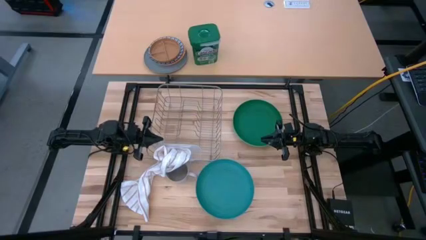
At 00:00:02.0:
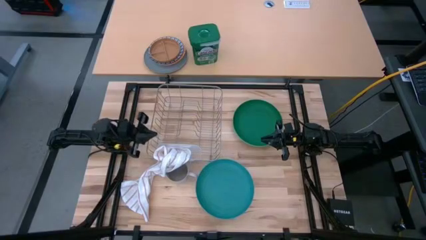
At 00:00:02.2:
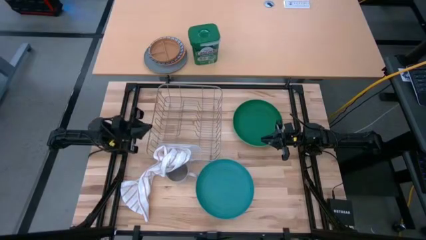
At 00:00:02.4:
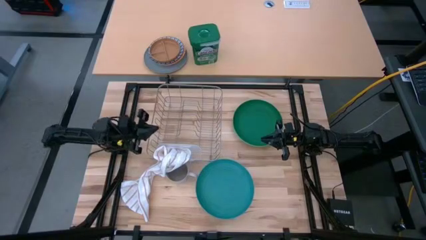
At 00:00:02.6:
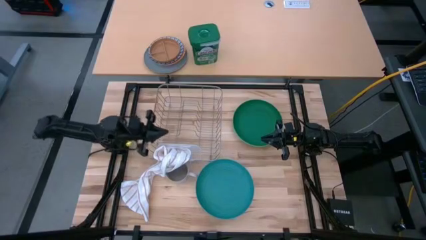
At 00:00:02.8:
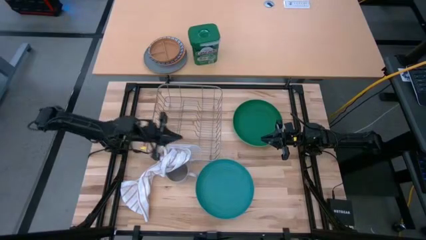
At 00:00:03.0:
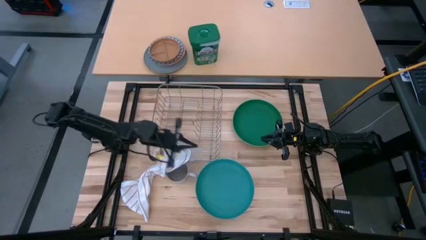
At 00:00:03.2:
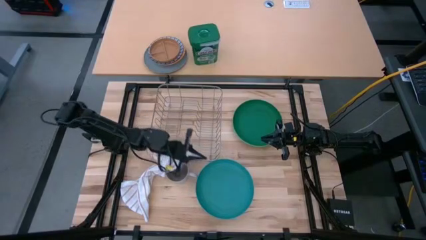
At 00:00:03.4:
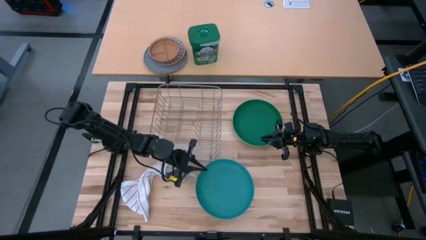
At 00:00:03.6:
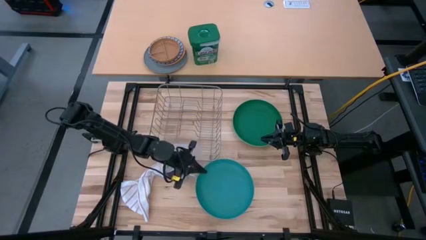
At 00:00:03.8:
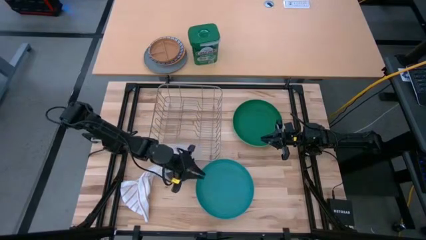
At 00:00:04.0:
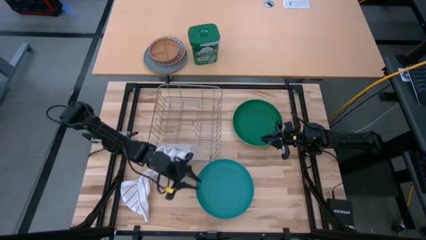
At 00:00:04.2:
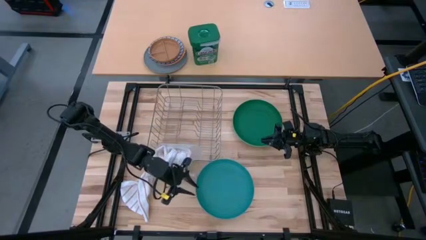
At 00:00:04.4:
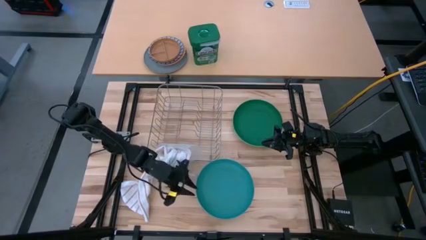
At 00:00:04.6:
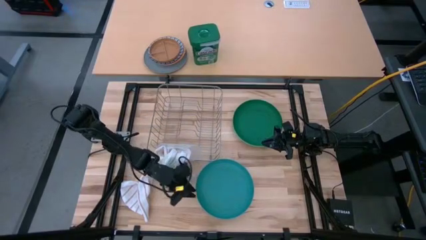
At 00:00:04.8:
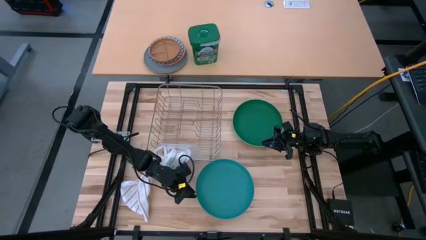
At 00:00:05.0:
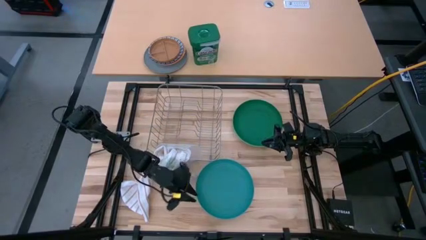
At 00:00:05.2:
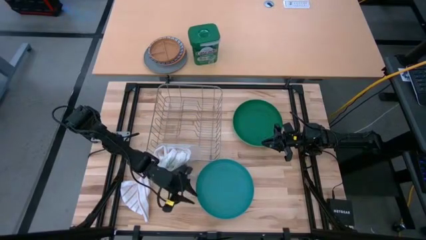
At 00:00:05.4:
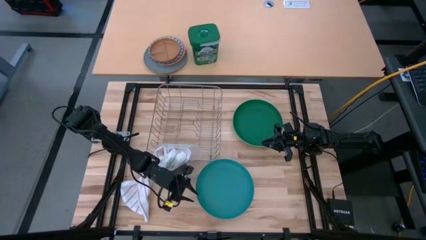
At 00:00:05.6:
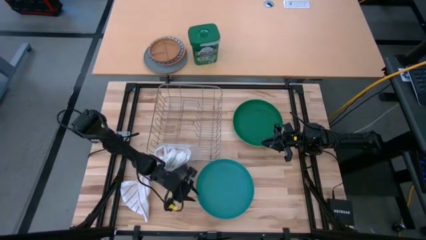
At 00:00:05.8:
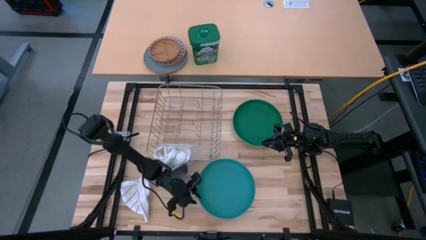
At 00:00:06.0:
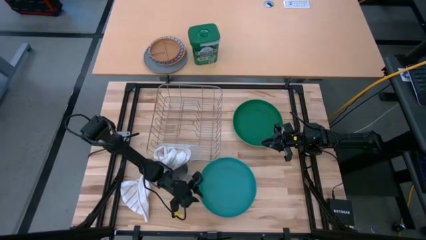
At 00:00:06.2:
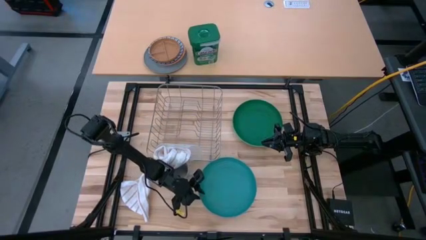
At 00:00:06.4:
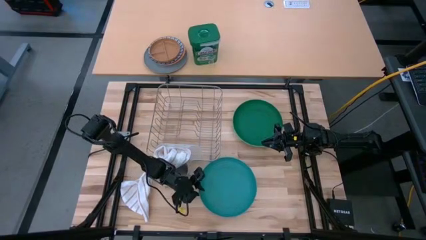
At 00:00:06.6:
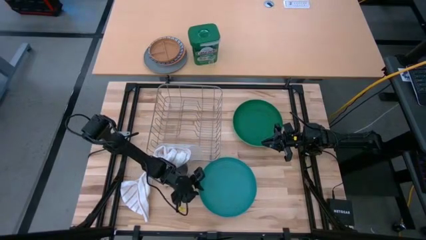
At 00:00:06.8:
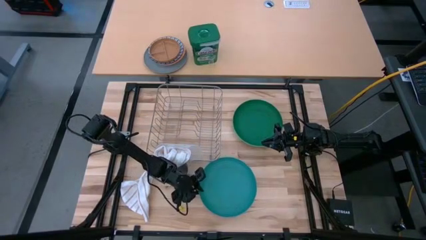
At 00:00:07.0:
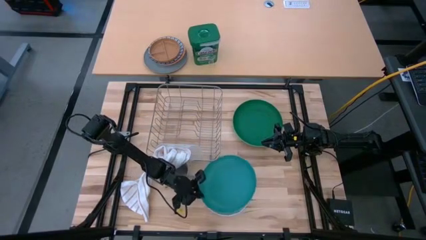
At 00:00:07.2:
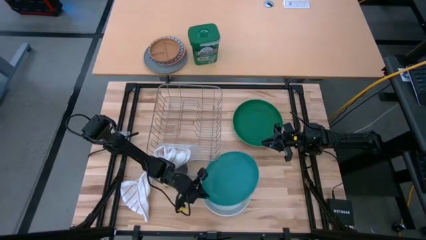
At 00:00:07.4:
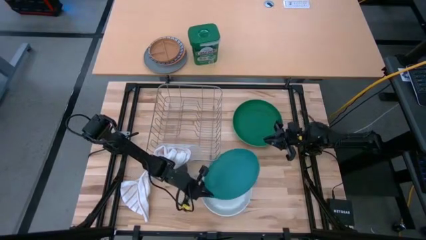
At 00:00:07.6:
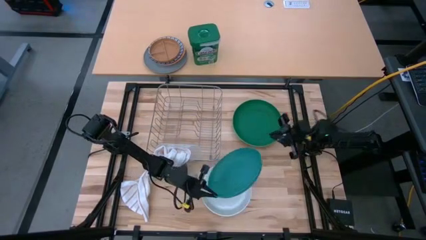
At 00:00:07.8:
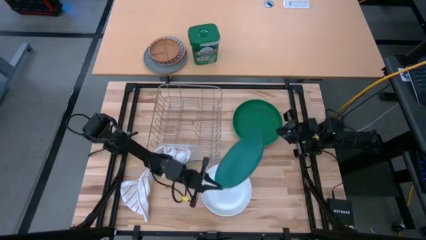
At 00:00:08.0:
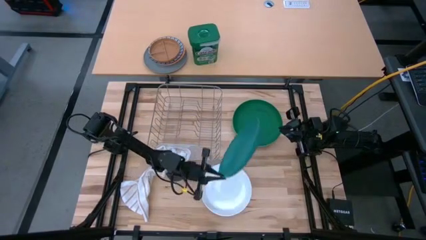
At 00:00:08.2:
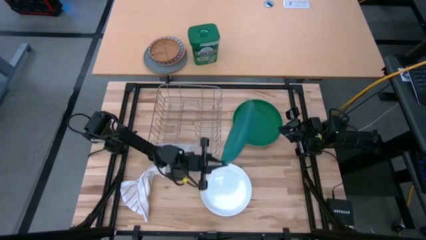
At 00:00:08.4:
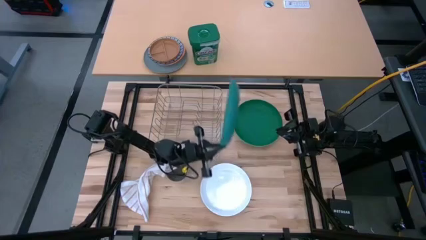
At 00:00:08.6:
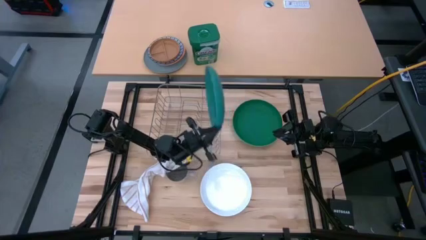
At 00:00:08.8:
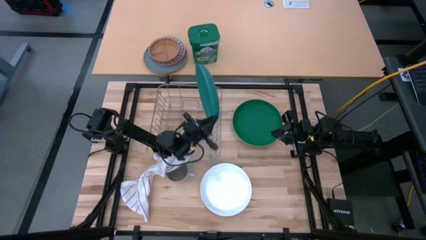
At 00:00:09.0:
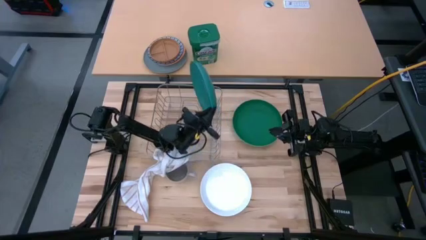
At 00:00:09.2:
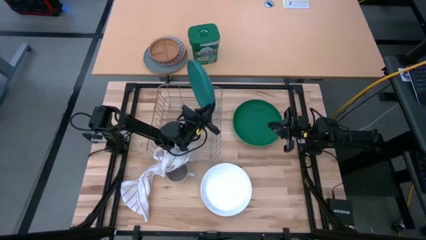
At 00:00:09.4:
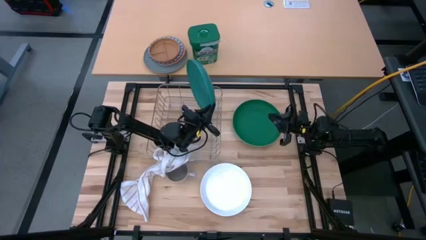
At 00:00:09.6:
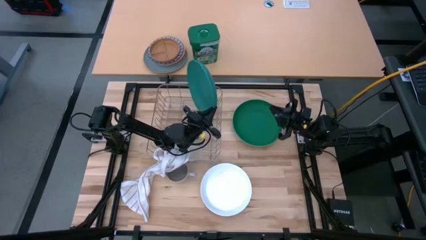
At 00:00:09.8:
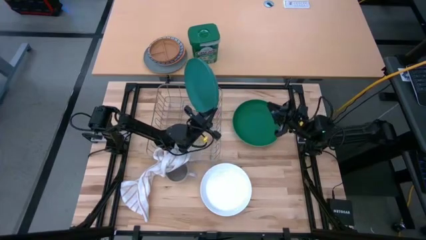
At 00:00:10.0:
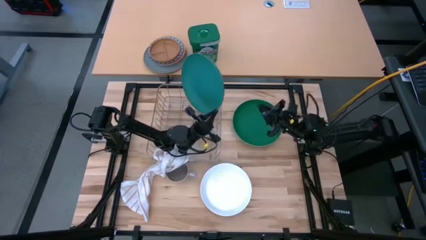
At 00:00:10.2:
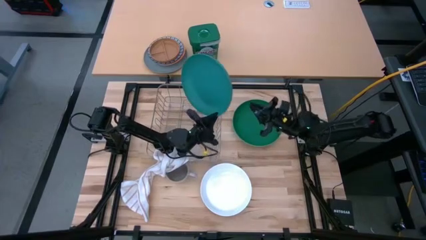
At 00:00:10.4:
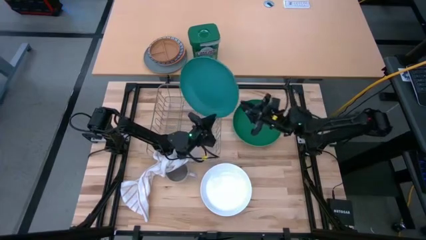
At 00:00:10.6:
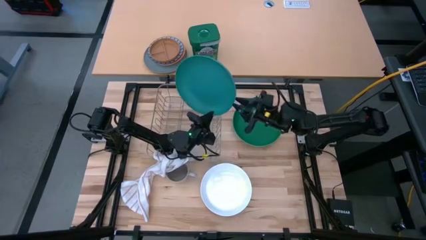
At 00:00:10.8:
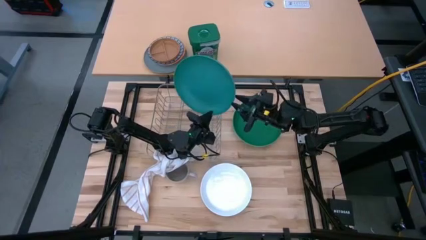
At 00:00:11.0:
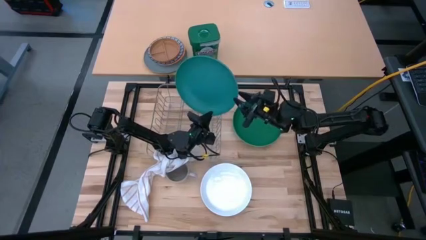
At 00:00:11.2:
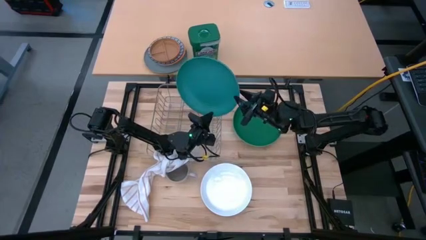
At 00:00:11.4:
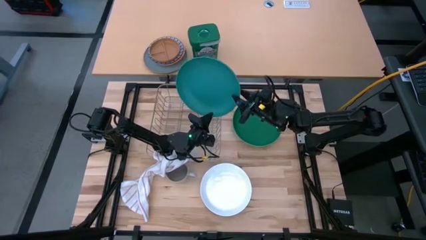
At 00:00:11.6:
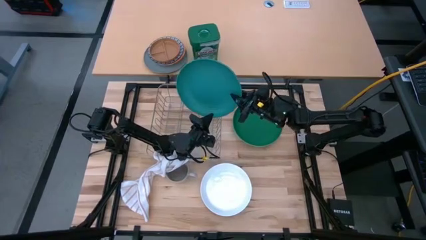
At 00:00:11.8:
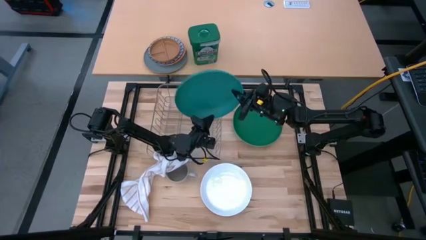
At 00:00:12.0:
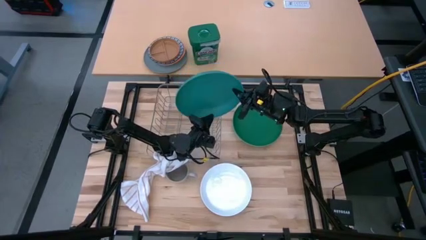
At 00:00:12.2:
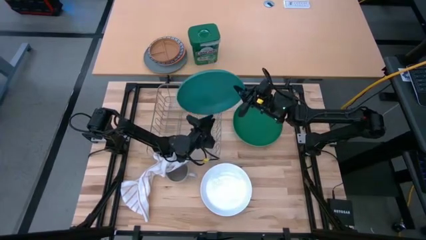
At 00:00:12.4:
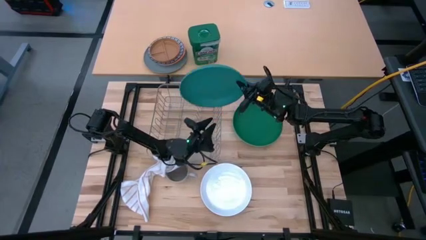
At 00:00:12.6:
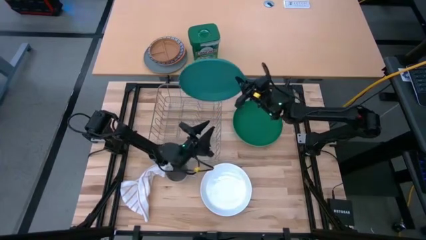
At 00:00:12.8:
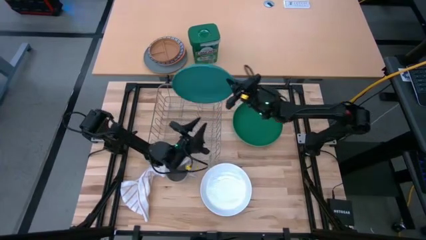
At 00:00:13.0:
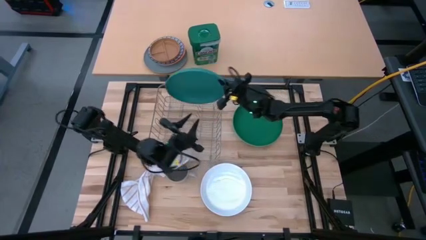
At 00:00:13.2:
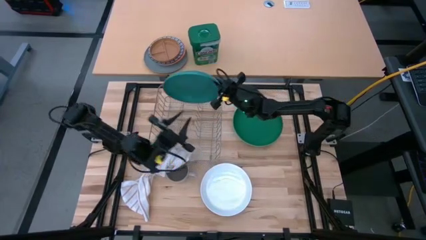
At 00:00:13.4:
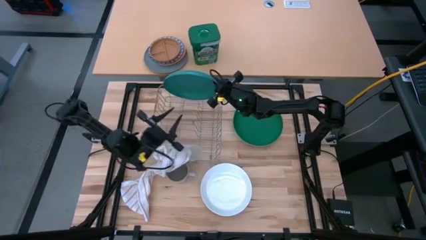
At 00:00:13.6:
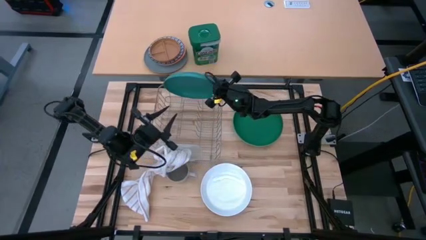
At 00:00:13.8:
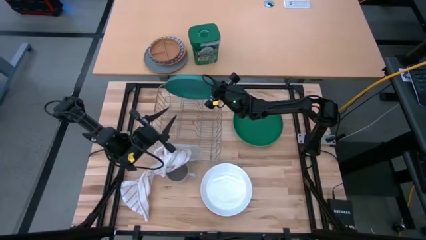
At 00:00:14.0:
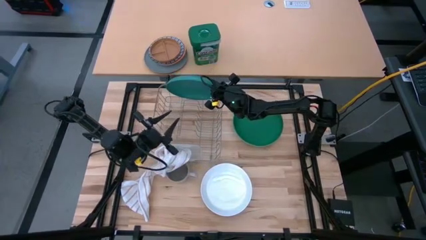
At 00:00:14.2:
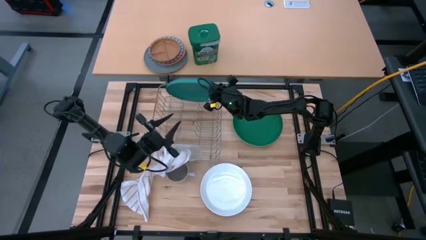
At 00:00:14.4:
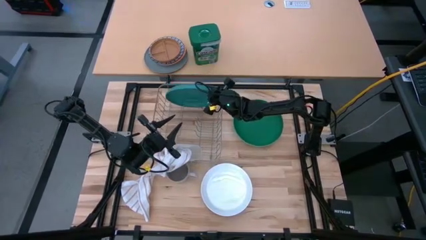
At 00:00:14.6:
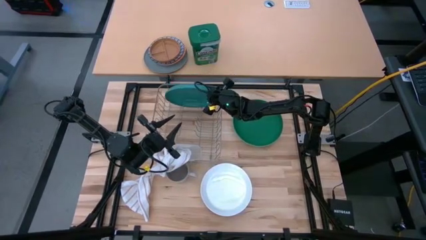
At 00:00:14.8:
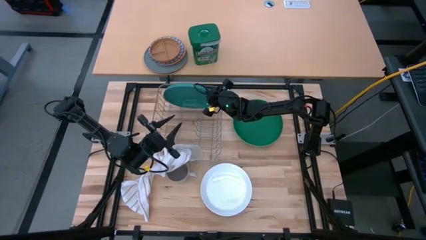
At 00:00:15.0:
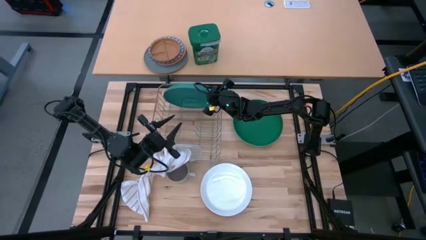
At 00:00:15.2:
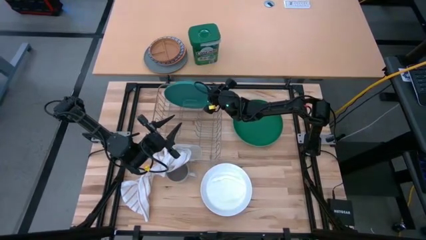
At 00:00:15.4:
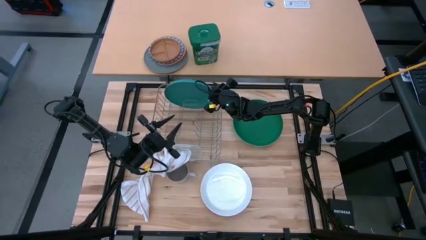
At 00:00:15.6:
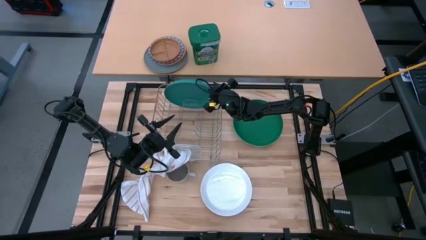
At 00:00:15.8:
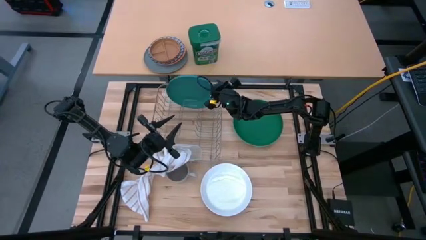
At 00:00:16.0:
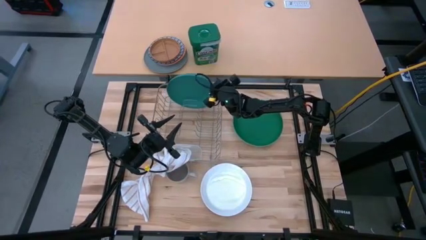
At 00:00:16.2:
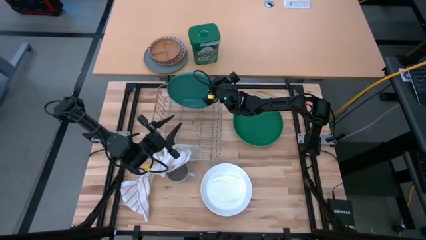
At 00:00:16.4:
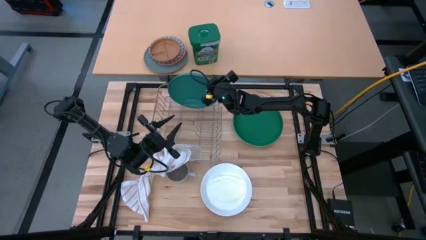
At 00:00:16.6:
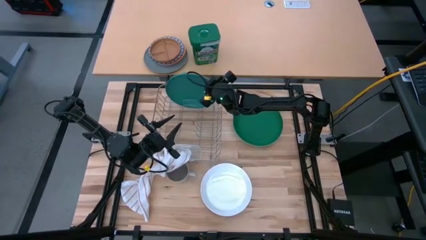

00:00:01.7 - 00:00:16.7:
Task: Sort dishes
Put the blue plate into the gray dish rack
